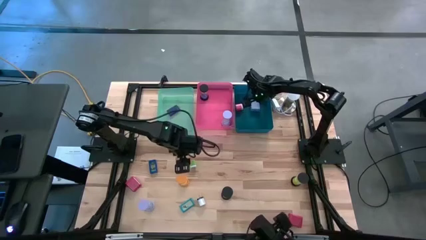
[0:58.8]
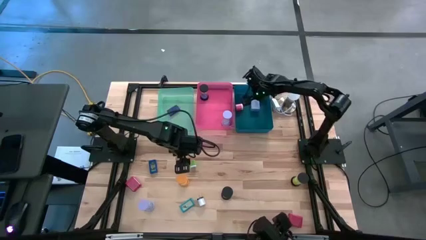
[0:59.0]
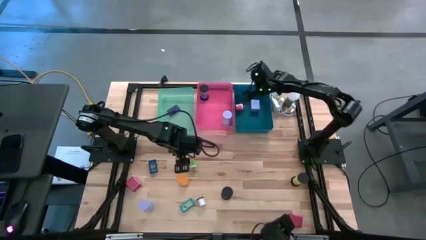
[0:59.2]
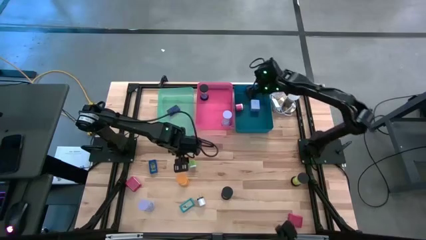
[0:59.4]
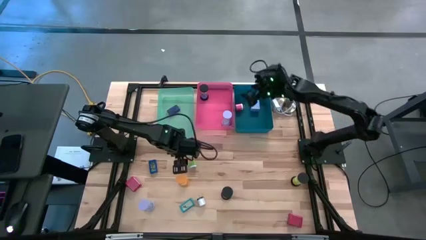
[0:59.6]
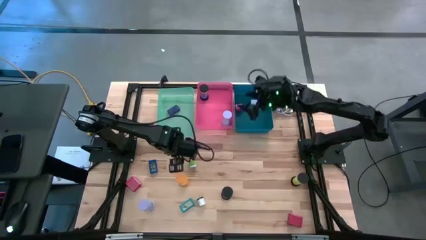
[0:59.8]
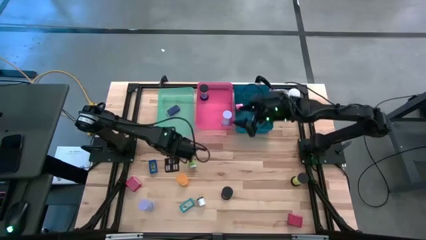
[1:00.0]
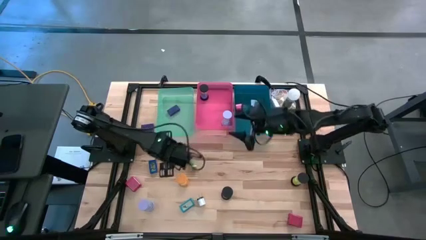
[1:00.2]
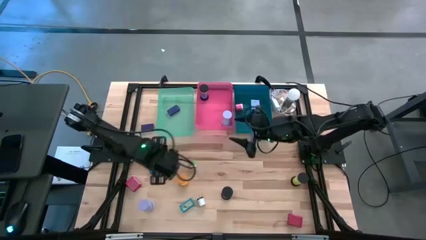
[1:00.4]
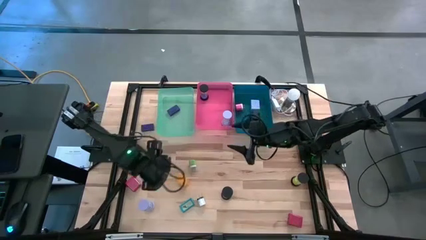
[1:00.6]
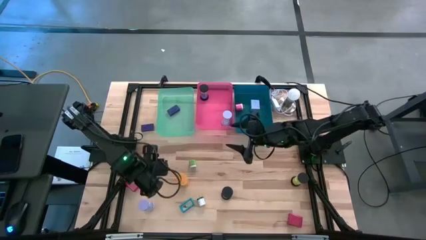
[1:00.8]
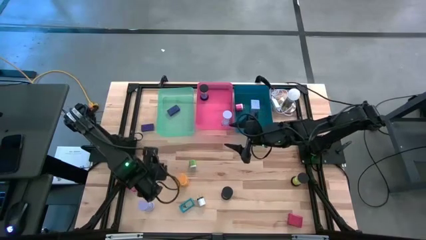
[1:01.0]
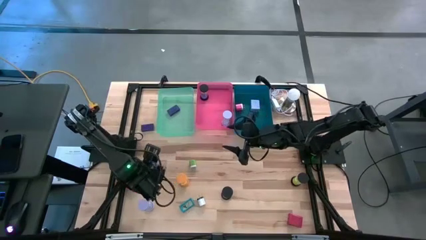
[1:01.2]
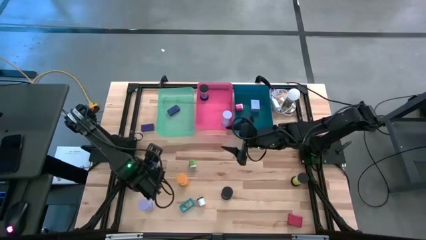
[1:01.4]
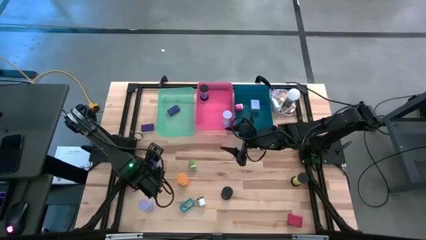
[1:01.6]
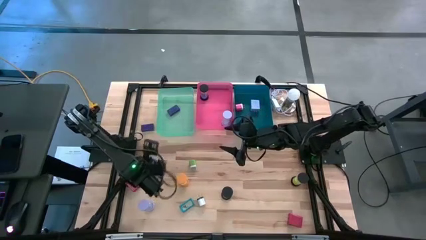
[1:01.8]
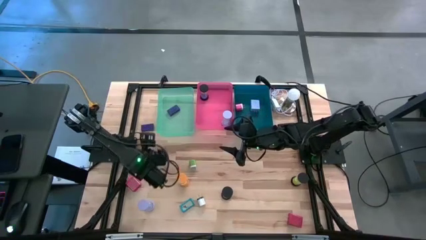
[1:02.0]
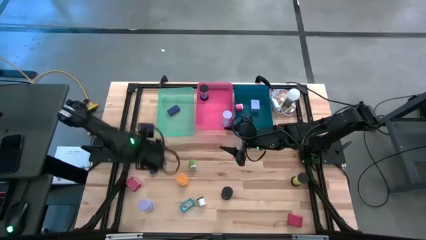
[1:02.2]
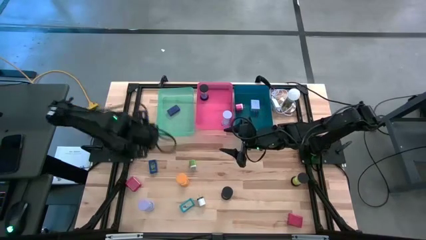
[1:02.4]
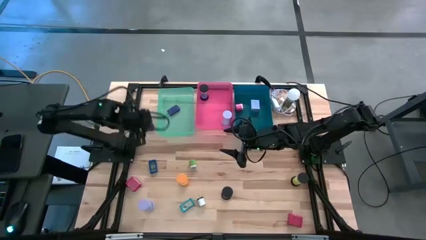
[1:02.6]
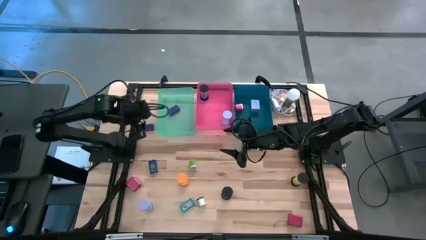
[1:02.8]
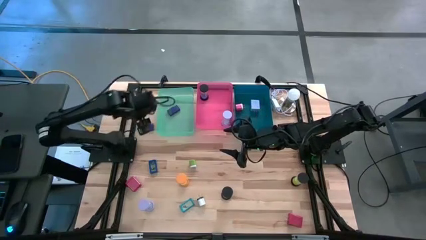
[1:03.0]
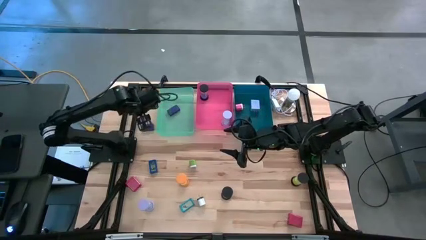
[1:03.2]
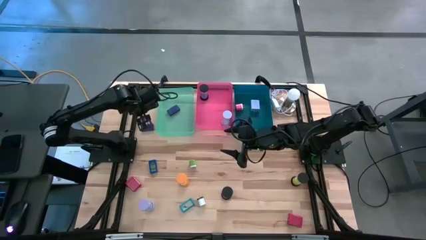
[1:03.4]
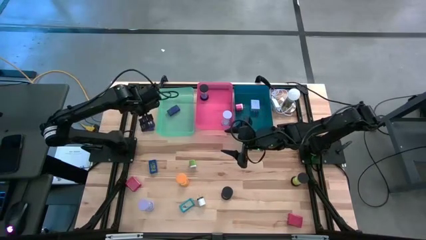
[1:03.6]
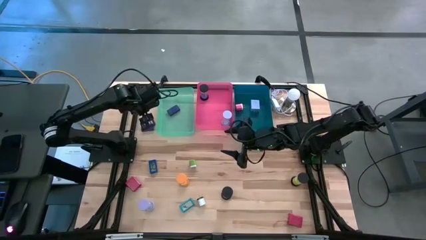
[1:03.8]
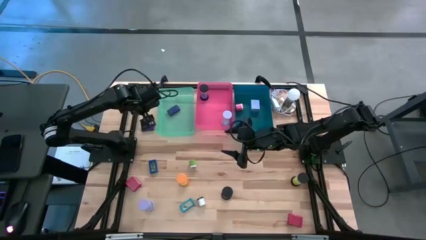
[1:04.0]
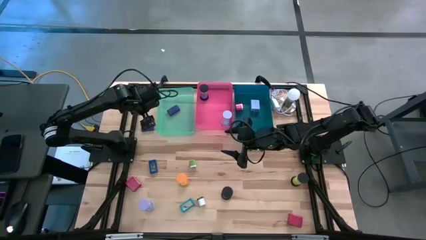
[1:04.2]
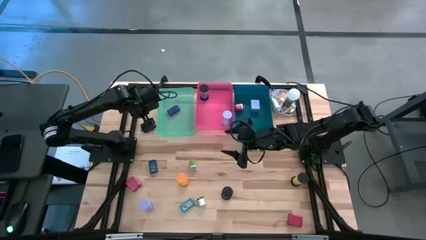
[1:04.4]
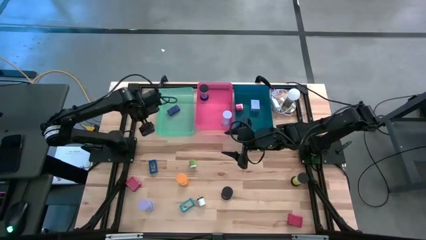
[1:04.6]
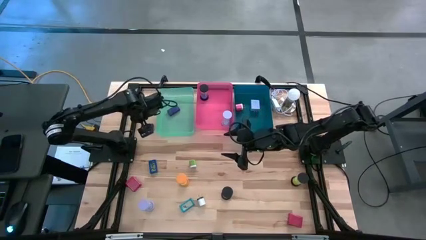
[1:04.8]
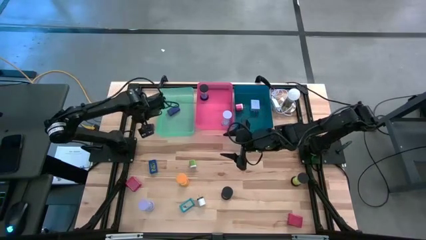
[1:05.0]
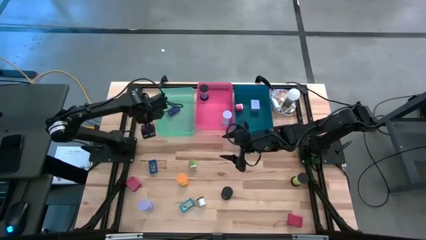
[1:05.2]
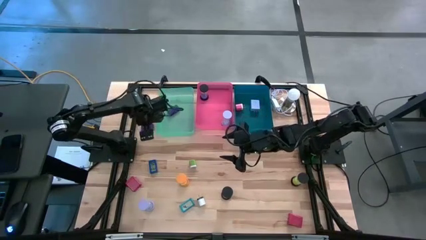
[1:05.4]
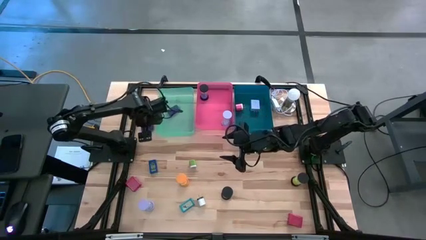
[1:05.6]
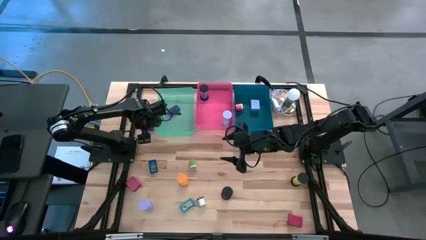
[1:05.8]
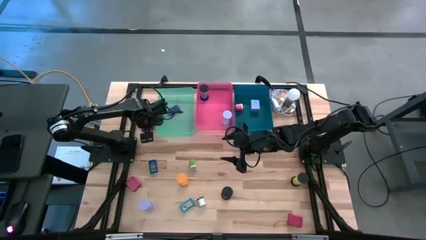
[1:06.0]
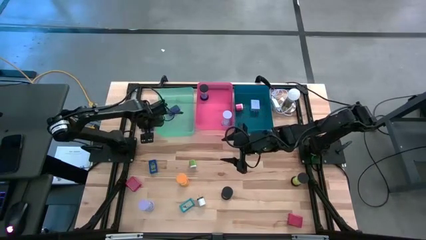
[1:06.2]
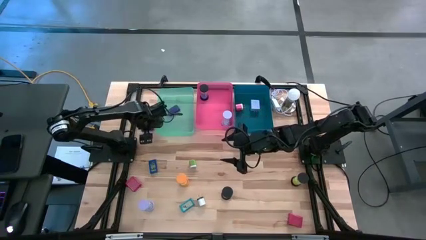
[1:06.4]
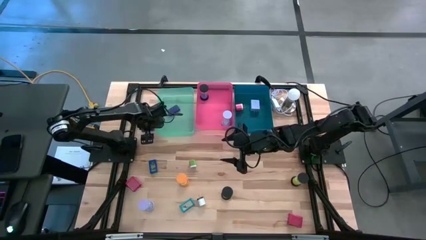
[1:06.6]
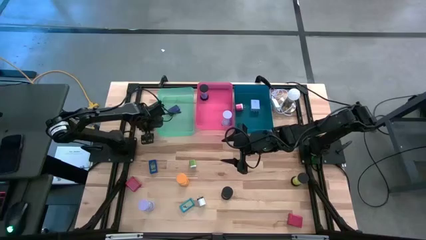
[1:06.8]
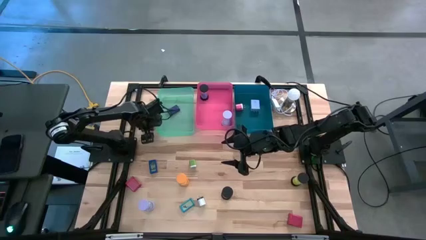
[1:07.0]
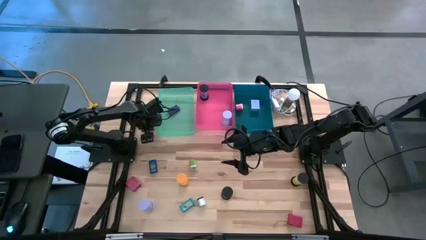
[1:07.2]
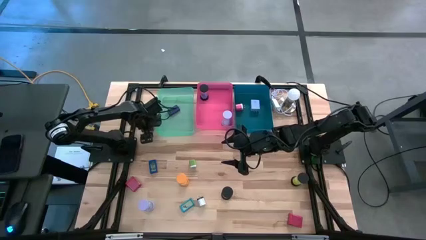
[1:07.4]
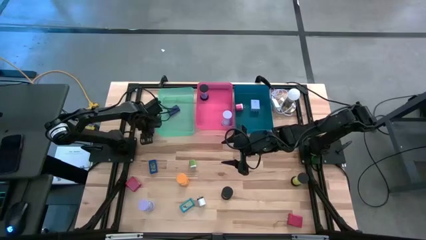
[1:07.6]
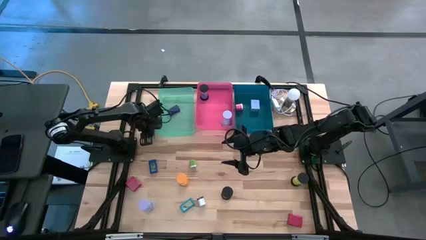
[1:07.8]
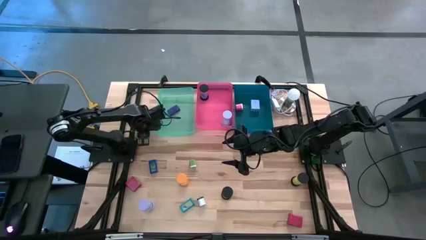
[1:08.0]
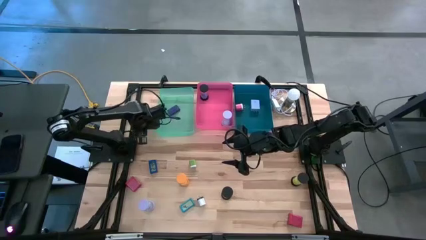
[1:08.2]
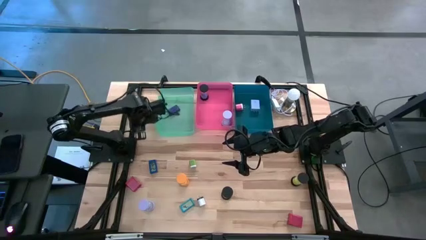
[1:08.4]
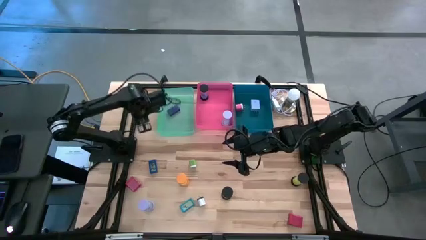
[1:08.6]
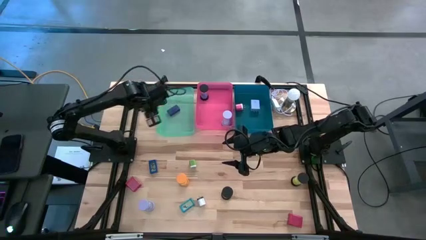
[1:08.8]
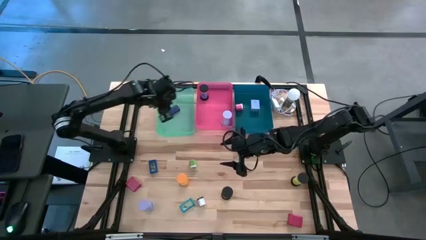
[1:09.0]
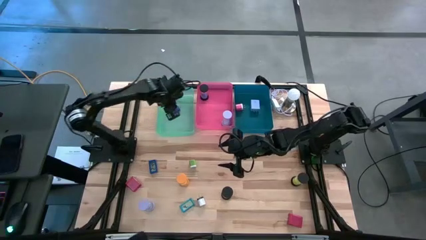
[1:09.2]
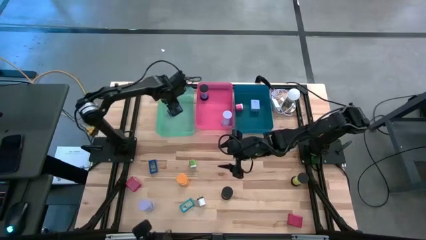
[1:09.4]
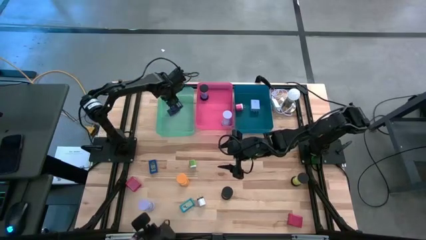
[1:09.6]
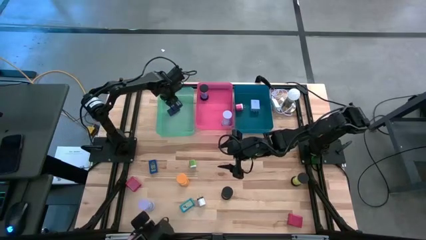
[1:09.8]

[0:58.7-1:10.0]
Task: Pick & Place Office items
Put the purple digital clock into the green bin
